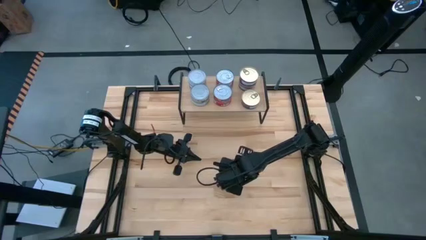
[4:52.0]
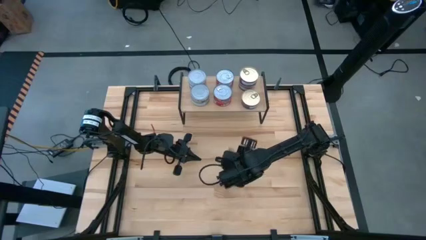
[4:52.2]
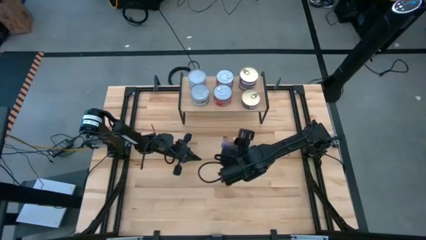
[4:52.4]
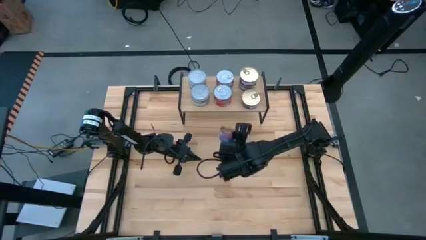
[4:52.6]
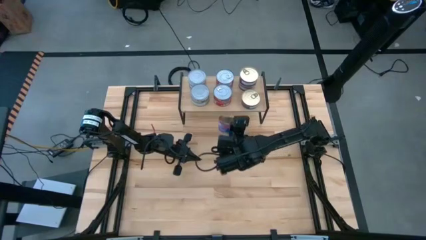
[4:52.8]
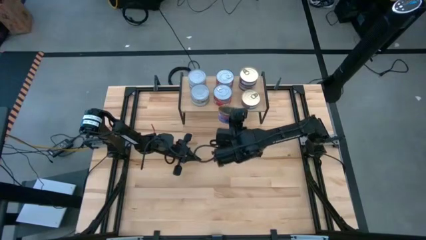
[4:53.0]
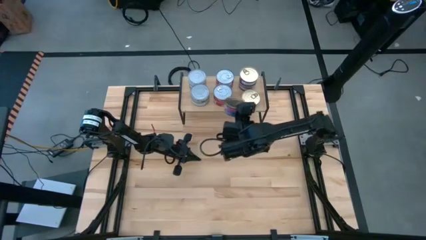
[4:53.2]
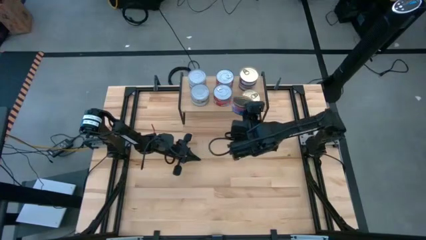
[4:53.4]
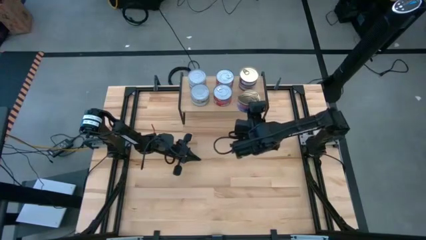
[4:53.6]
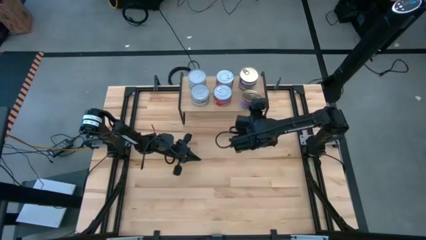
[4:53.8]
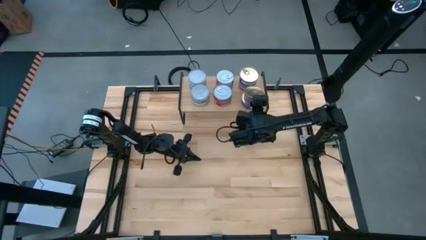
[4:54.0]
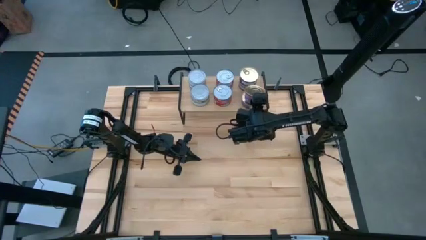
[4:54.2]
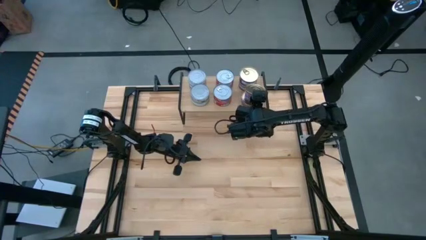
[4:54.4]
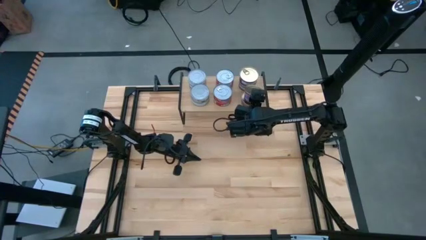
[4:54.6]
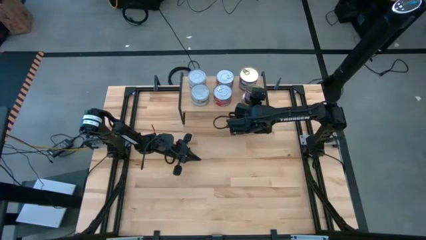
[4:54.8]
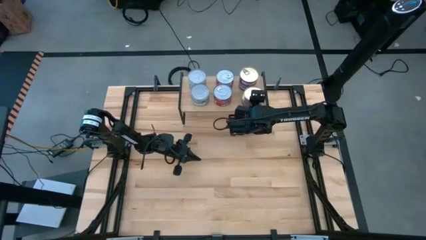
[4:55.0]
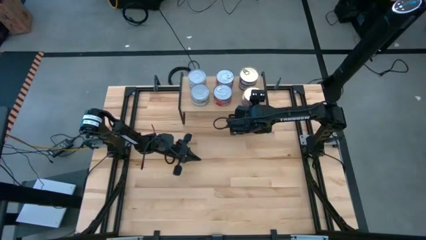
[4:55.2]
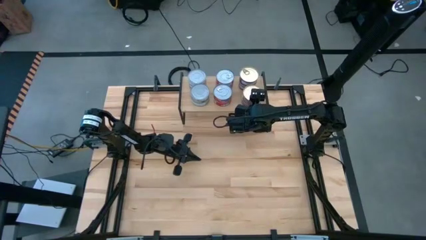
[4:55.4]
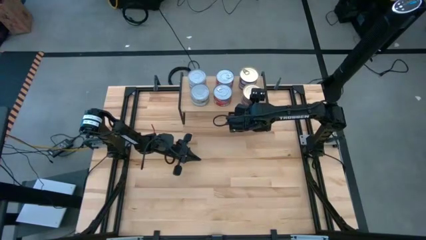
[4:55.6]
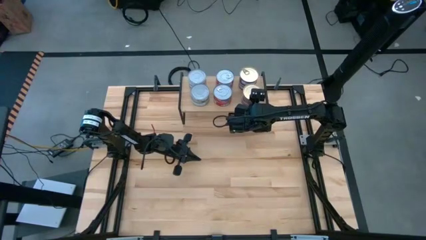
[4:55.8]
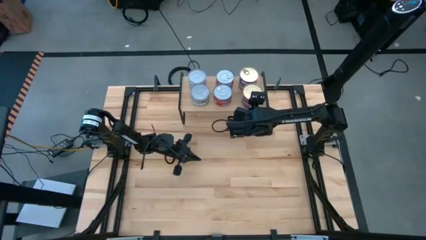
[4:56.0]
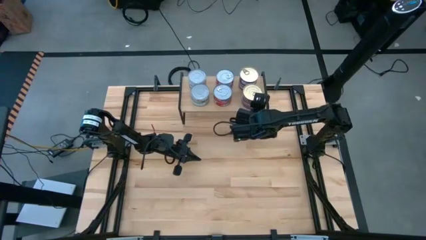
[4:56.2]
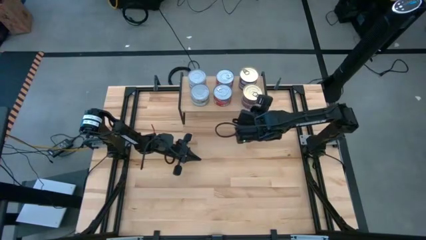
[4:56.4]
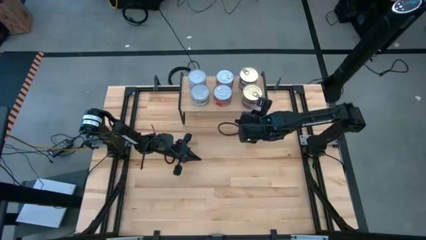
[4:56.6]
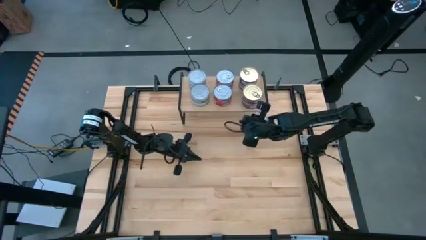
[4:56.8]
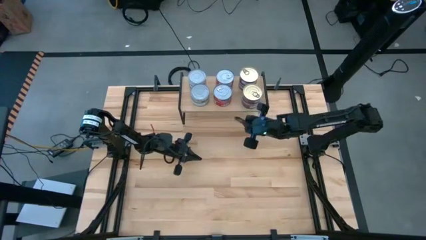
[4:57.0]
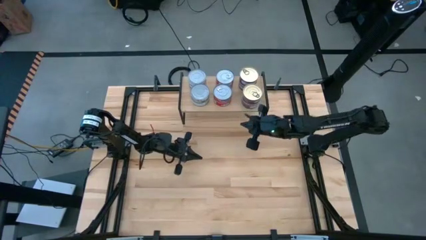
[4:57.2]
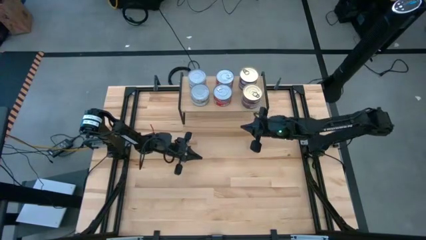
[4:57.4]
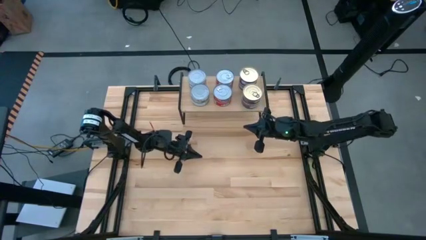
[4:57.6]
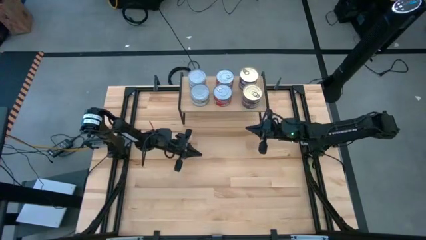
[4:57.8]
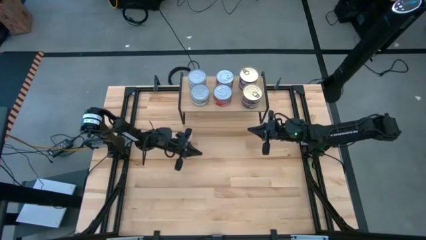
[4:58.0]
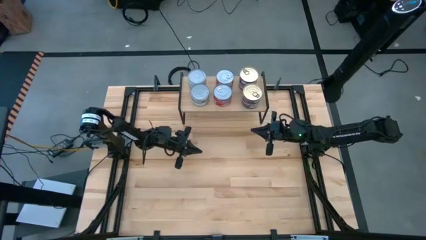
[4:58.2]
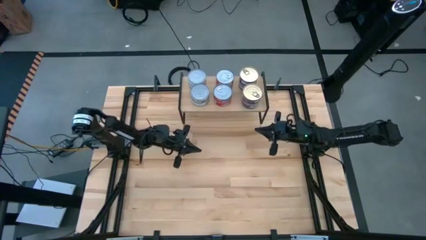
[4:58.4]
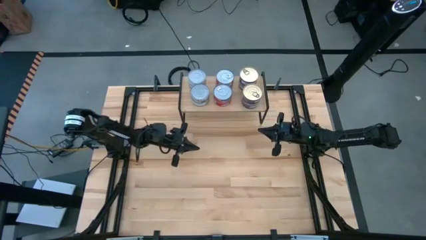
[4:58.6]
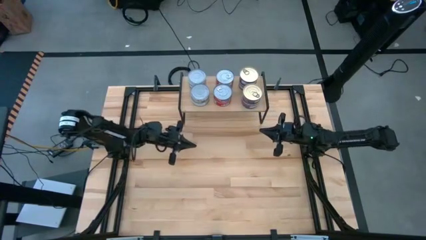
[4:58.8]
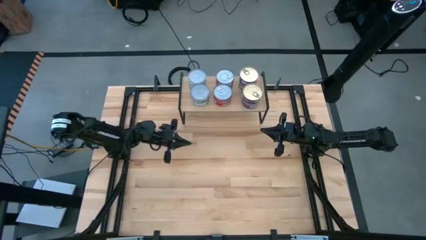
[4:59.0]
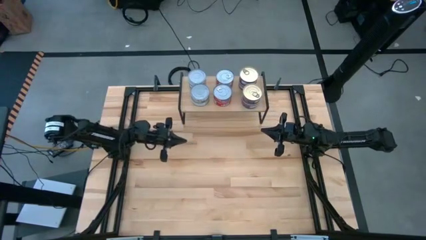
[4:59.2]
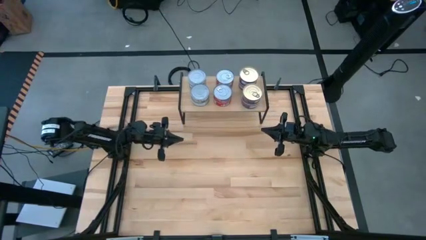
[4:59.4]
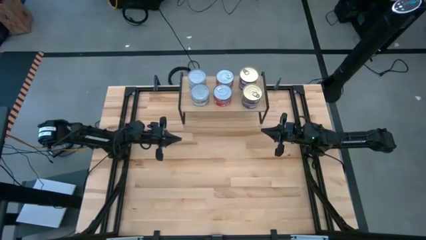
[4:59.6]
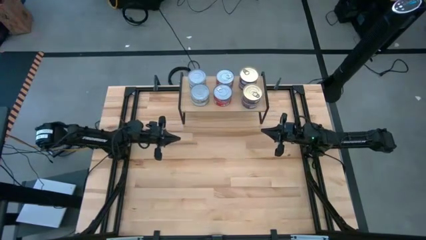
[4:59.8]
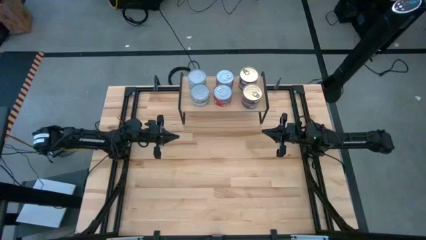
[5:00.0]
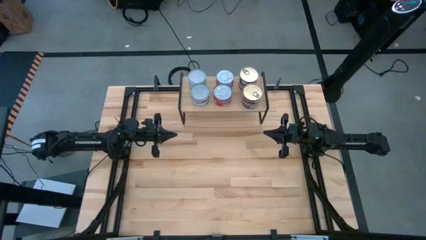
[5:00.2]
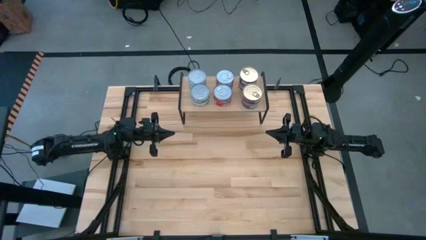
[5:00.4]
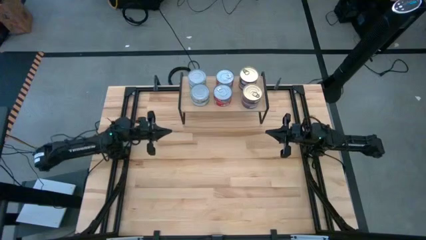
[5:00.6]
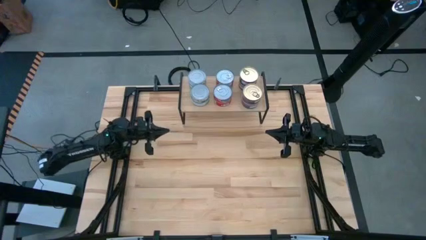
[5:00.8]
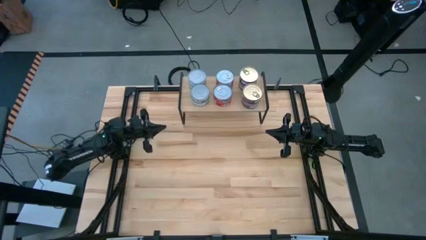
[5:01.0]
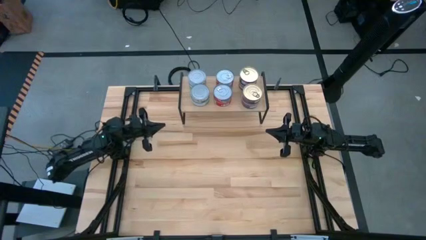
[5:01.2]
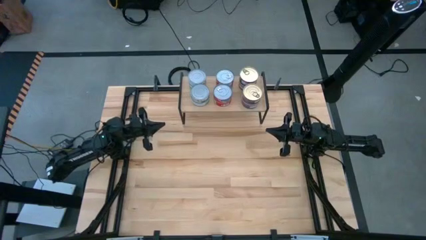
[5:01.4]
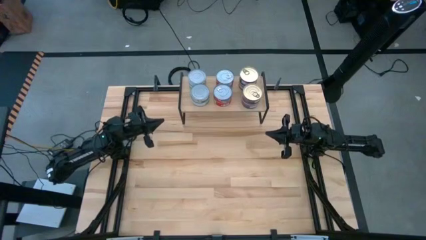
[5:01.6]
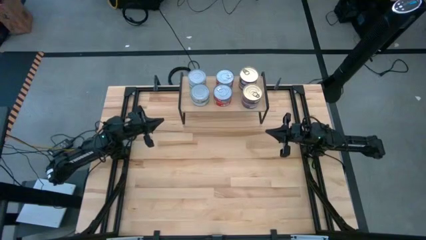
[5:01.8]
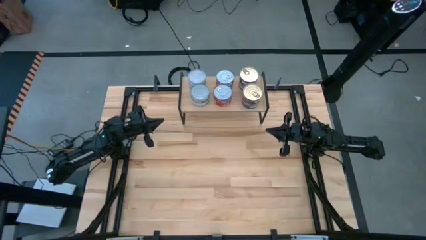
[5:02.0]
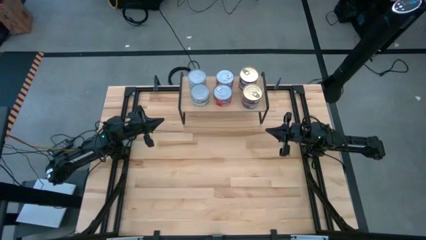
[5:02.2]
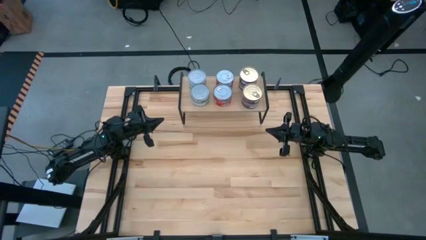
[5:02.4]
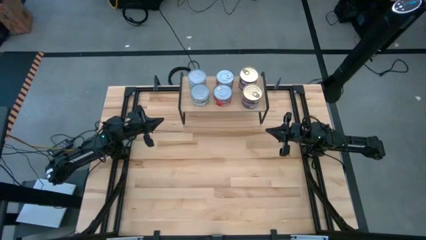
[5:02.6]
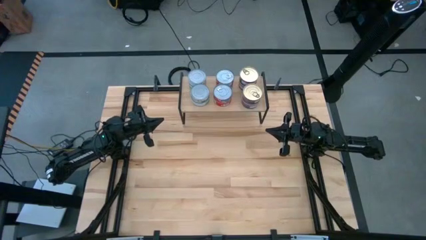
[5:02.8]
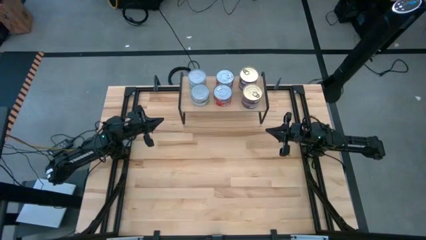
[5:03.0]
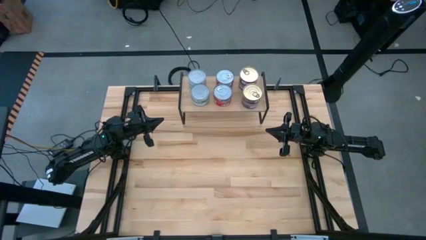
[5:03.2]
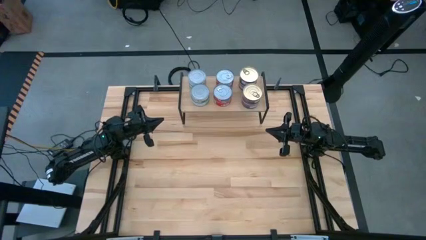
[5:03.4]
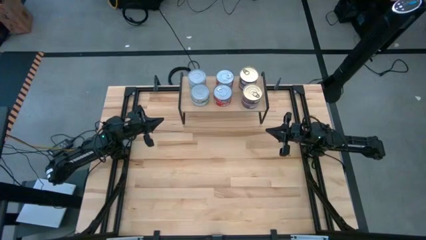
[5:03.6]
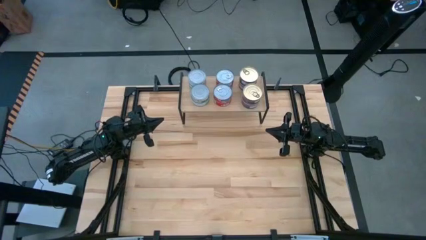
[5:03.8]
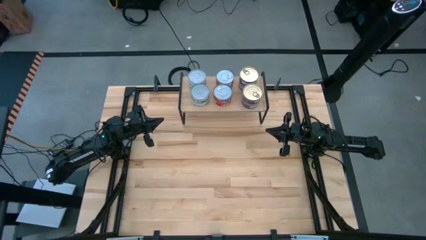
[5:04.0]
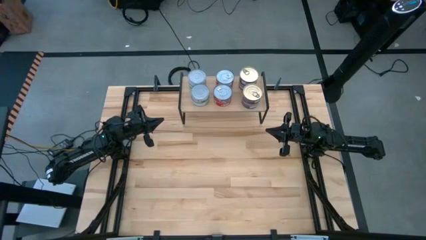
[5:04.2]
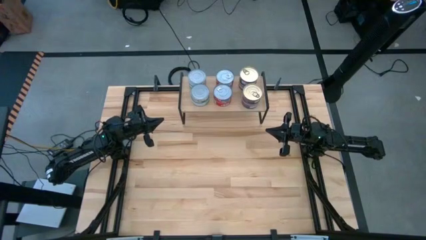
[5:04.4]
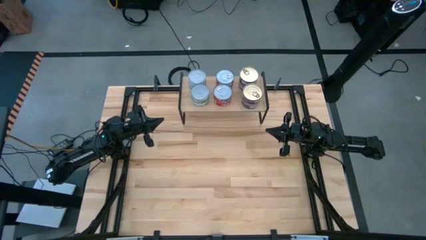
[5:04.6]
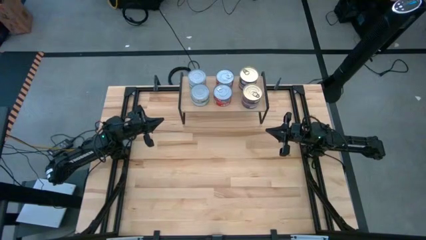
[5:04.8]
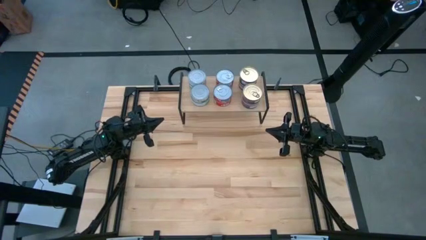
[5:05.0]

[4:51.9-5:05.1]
Task: Stack canned seafood by type on shelf
Return to Home Position

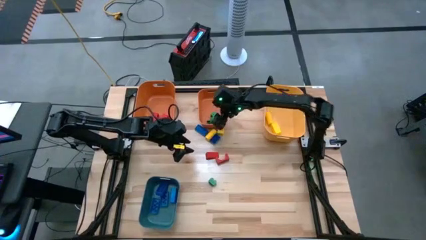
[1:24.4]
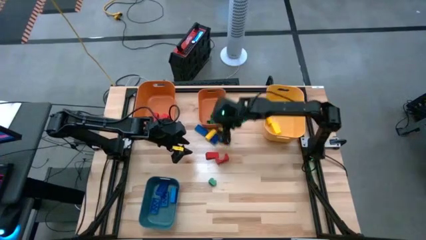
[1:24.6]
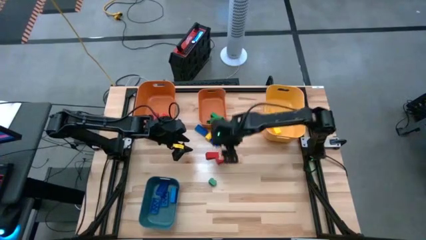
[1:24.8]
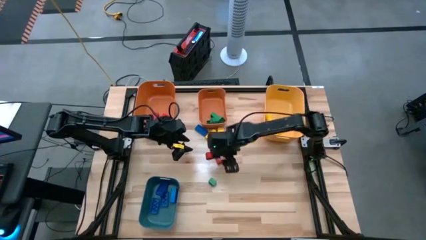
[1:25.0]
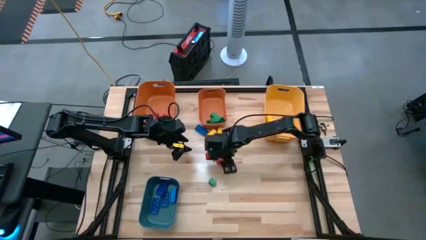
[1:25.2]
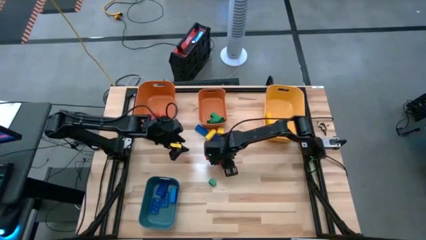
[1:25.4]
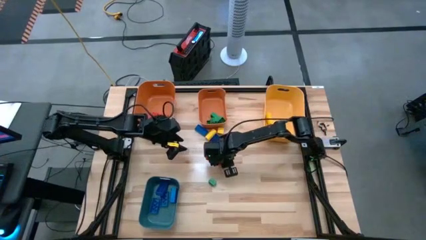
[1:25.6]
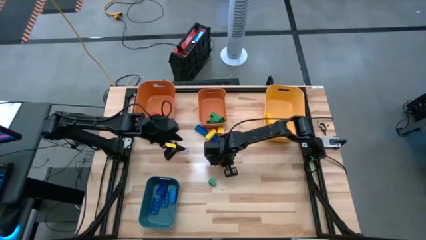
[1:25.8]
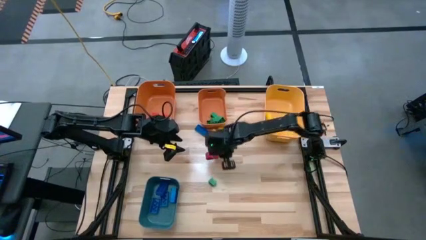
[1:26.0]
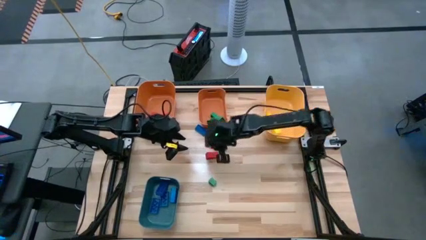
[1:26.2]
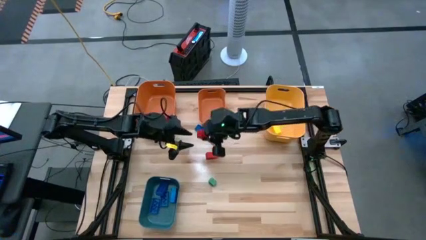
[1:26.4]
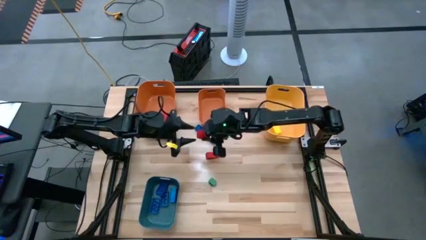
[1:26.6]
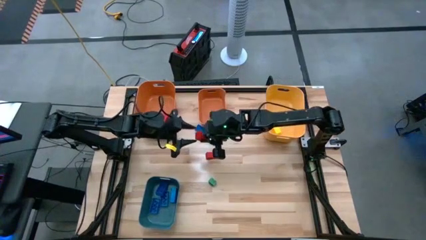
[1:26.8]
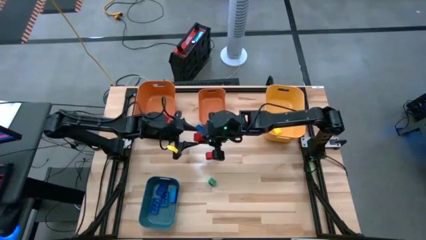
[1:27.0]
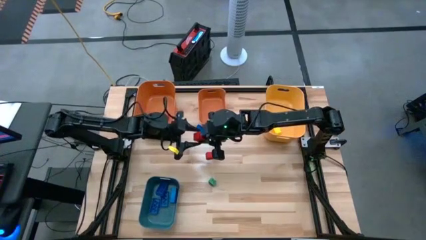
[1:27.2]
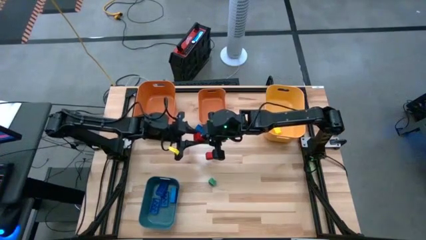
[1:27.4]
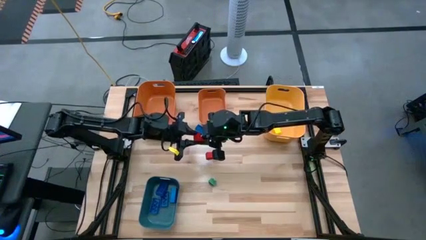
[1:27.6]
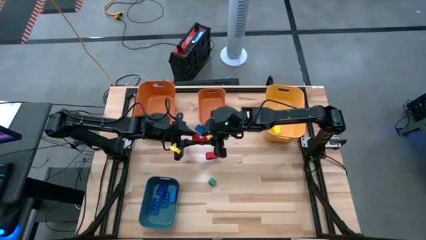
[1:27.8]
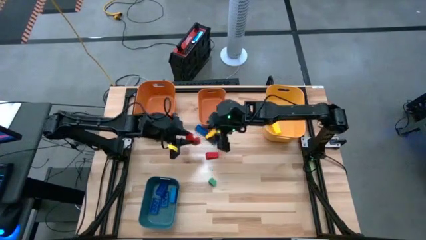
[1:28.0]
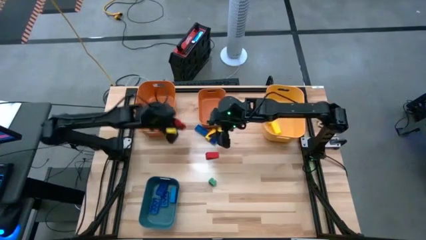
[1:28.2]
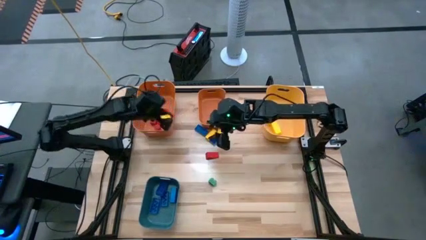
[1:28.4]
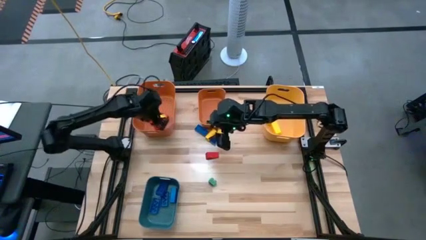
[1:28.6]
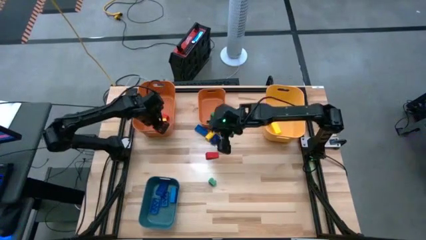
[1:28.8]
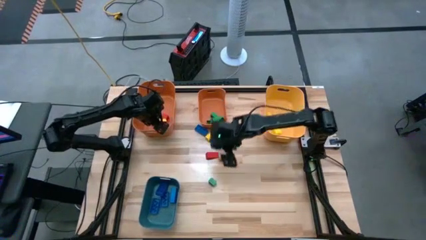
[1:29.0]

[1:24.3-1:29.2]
Task: Sort blocks
Put the red block into the left orange bin
